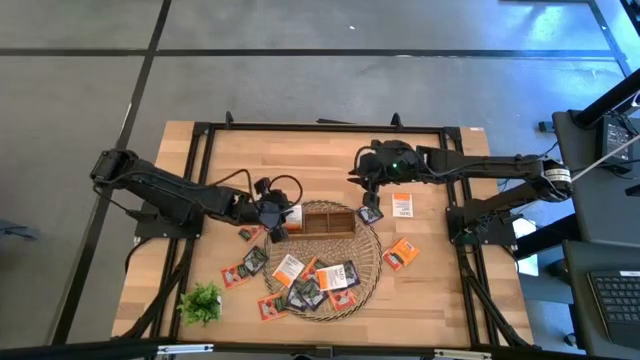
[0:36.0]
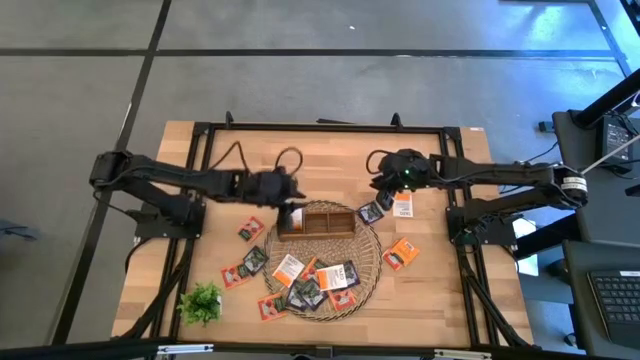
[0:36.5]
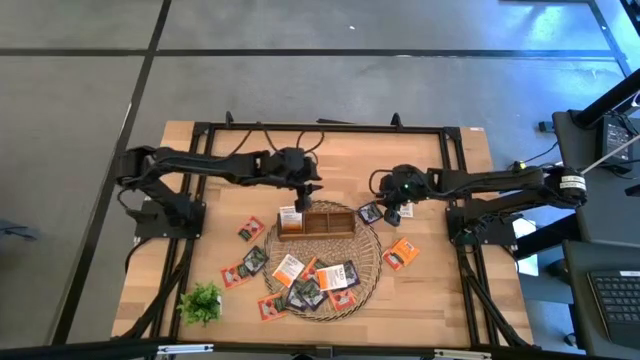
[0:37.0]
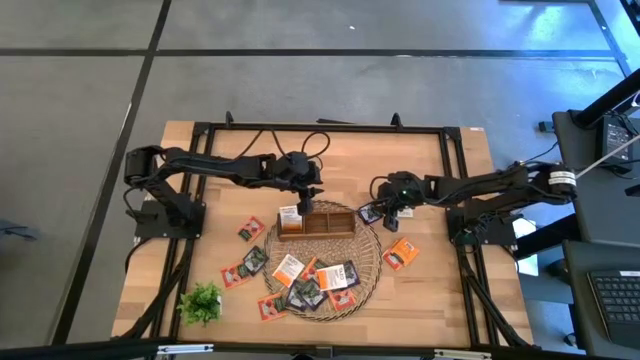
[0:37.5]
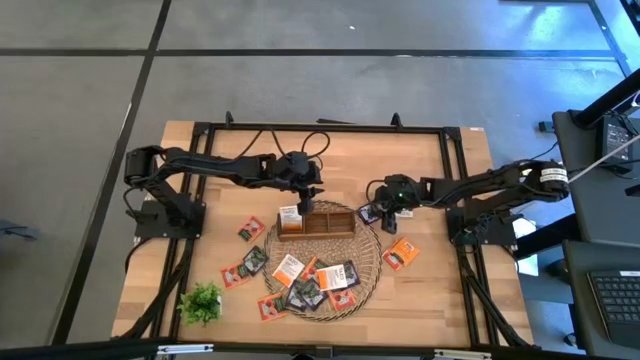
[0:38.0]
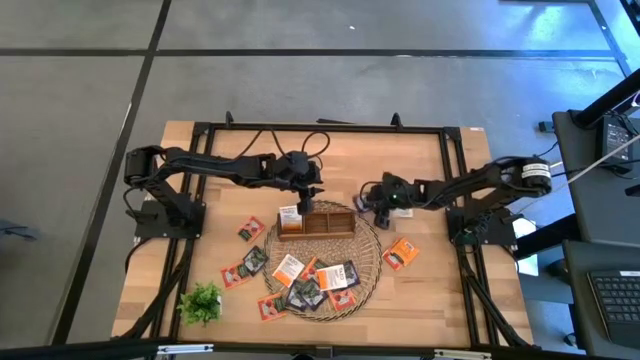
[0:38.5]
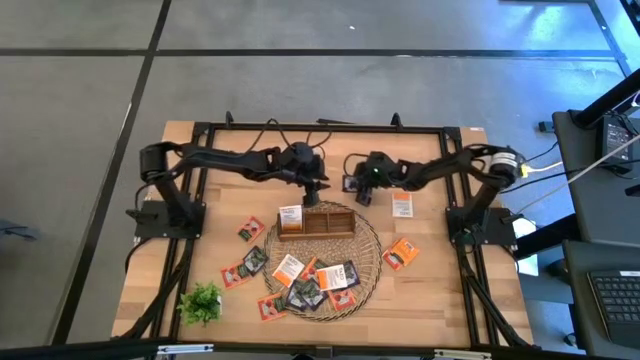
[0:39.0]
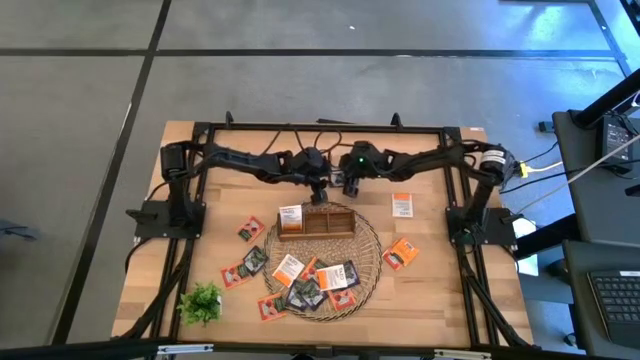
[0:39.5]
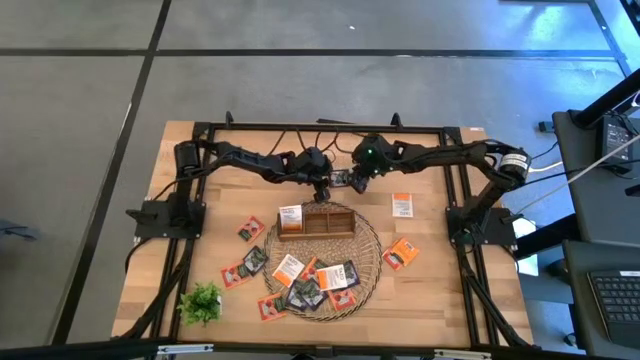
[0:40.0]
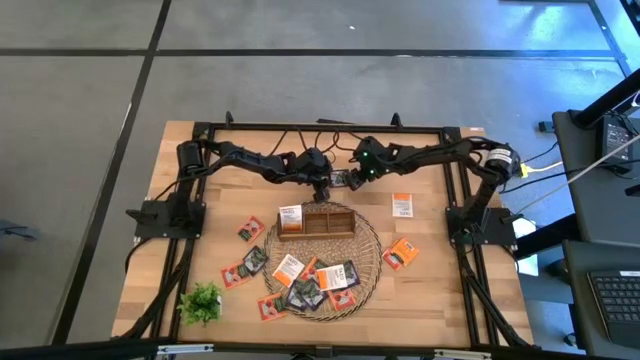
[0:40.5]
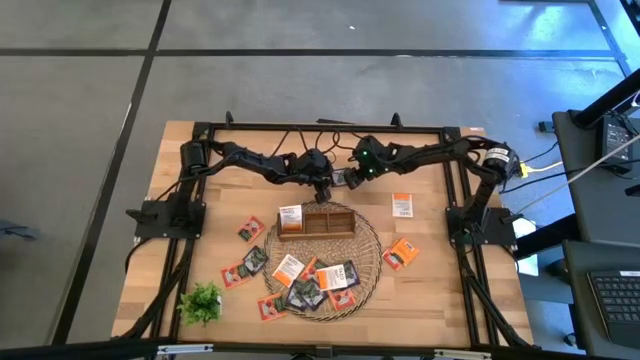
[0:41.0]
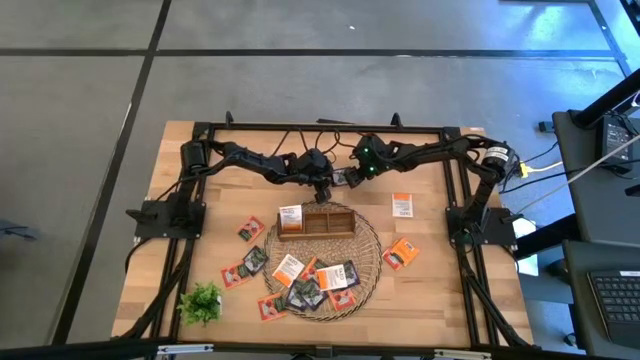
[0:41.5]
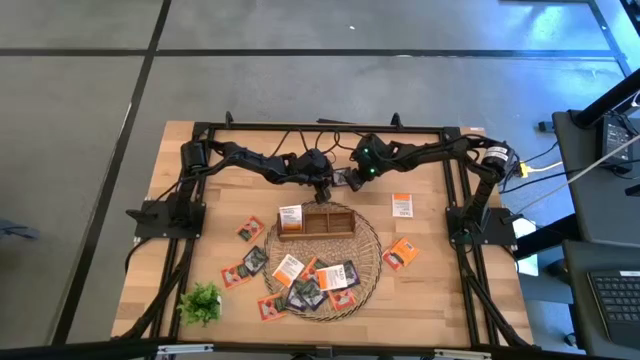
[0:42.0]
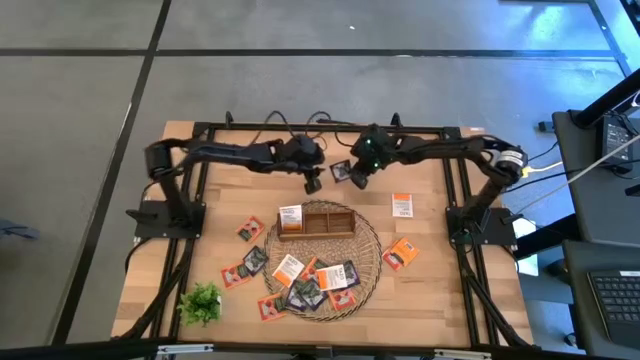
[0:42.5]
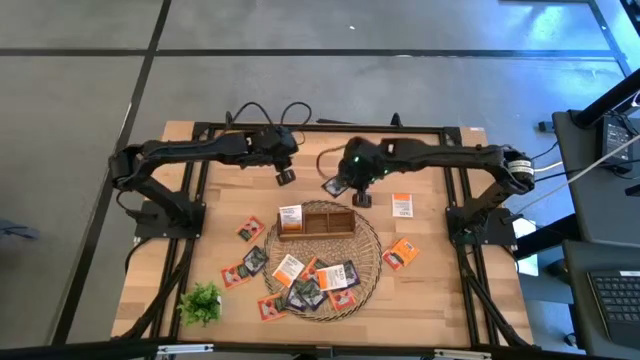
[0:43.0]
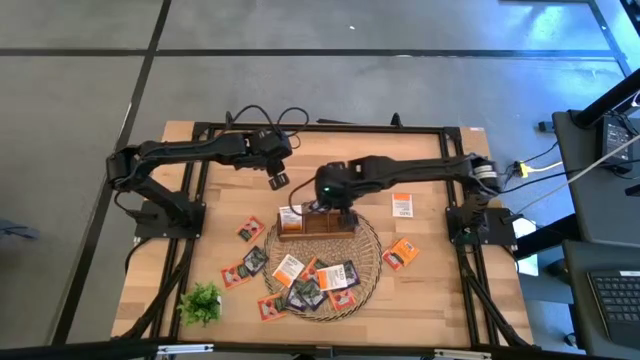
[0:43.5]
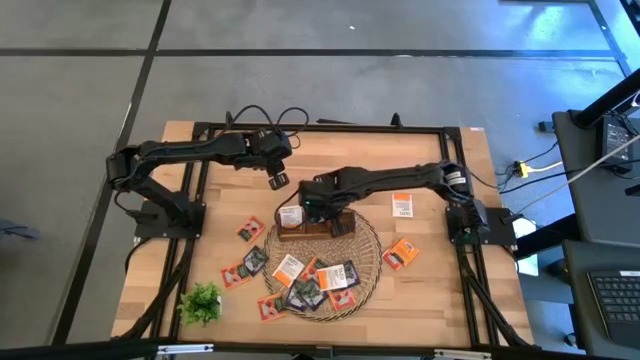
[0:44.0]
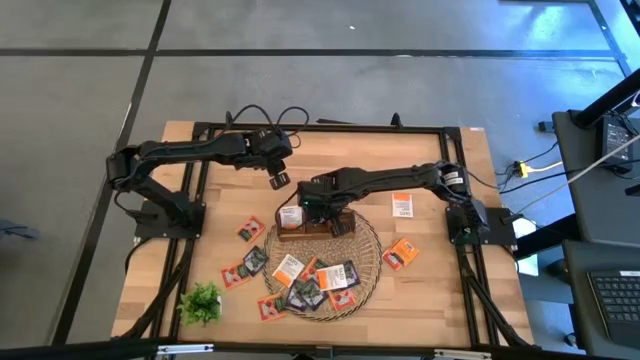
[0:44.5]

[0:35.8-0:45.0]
Task: Pick & Place Tea
Put the violet tea bag into the middle slot of the wooden organizer
